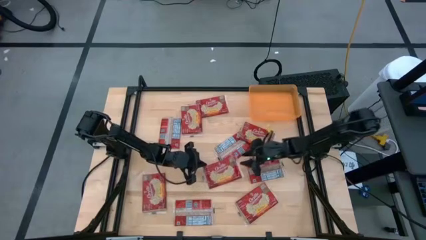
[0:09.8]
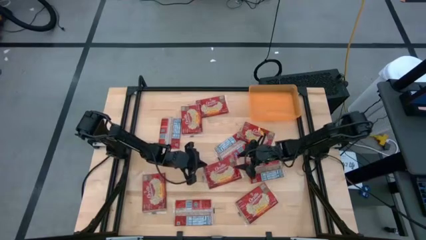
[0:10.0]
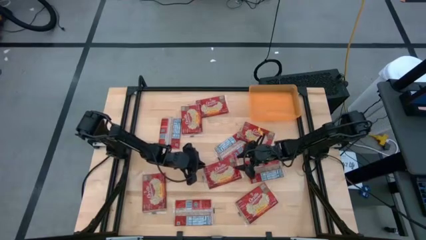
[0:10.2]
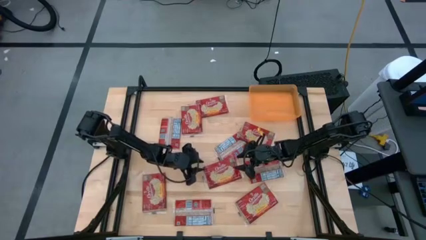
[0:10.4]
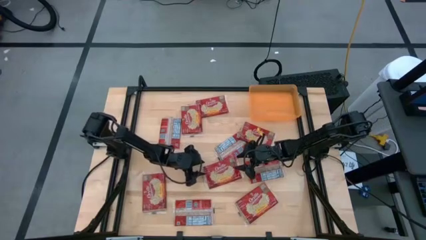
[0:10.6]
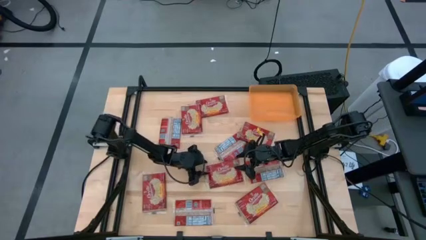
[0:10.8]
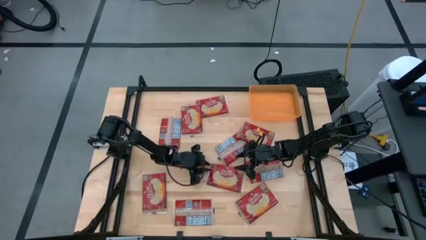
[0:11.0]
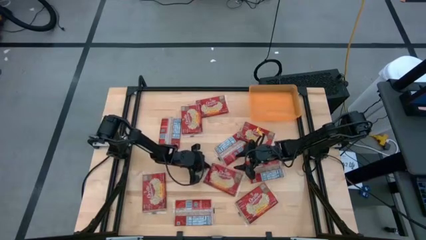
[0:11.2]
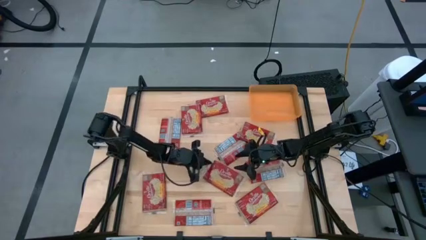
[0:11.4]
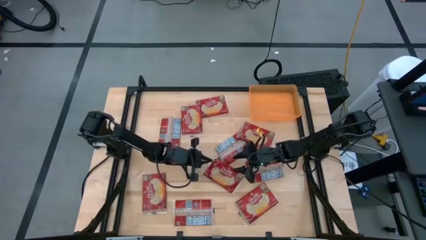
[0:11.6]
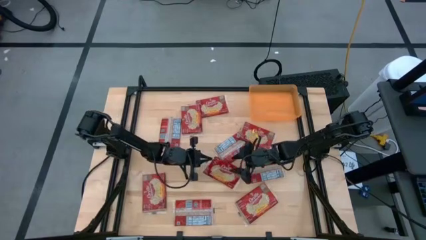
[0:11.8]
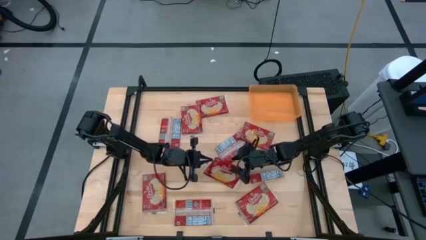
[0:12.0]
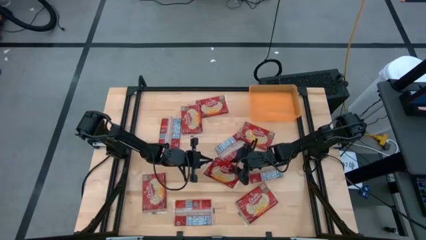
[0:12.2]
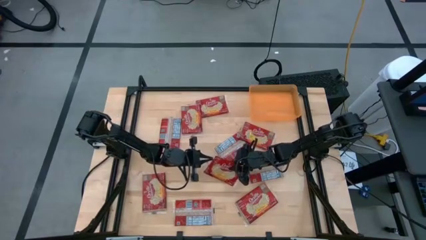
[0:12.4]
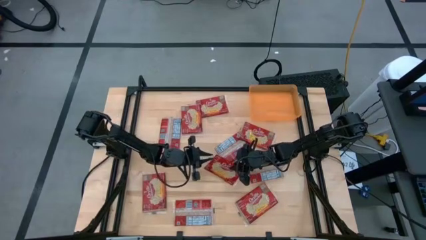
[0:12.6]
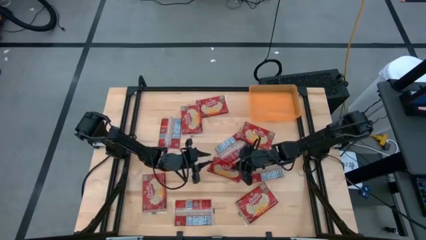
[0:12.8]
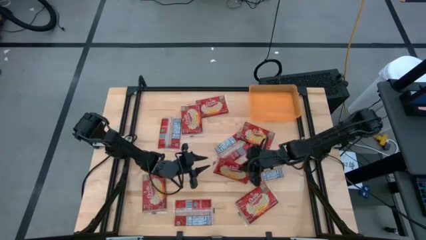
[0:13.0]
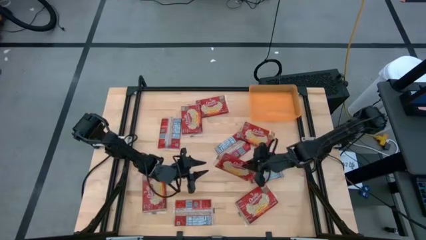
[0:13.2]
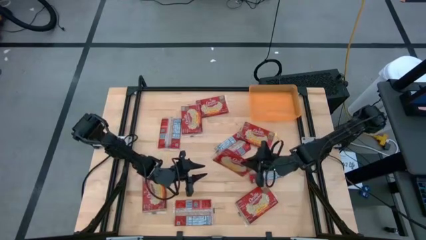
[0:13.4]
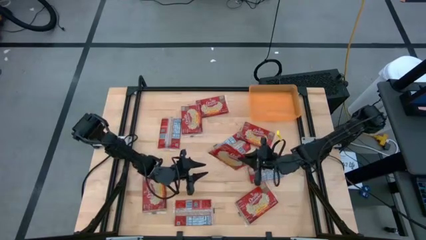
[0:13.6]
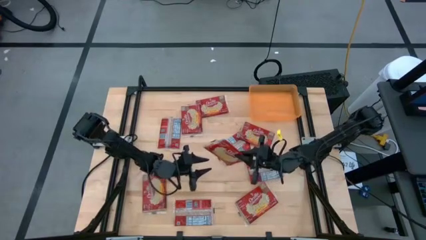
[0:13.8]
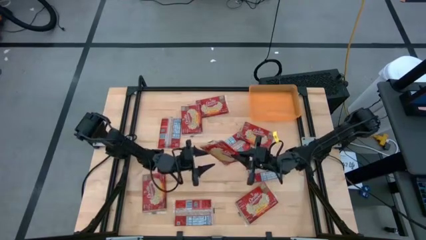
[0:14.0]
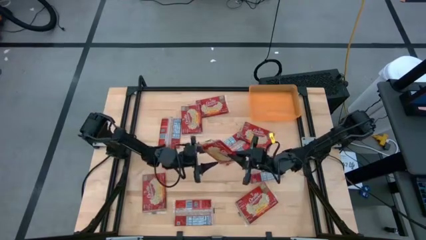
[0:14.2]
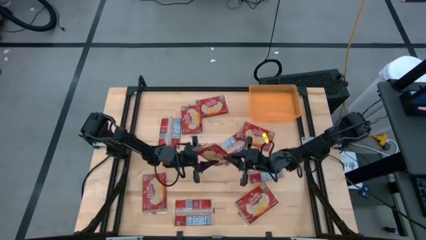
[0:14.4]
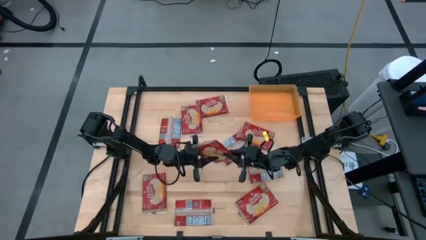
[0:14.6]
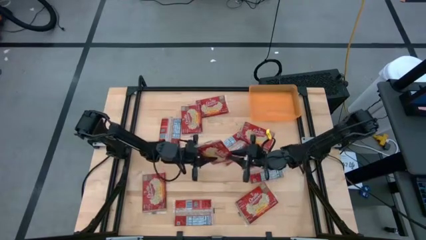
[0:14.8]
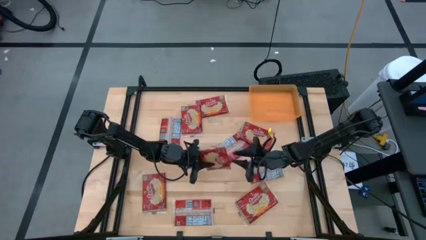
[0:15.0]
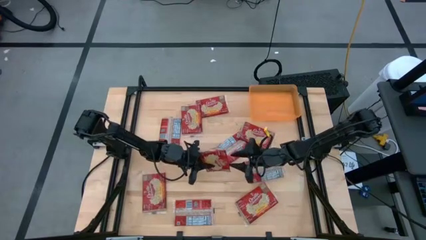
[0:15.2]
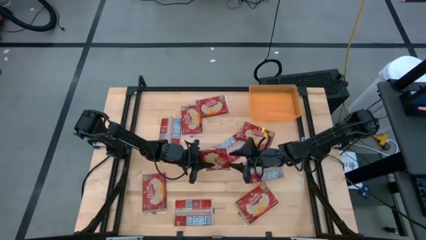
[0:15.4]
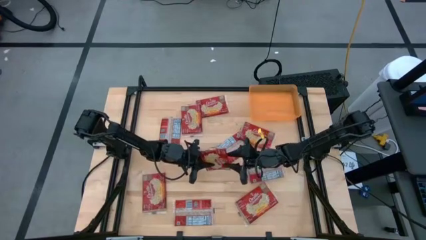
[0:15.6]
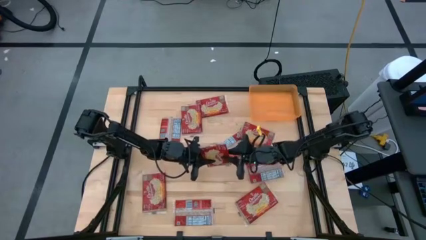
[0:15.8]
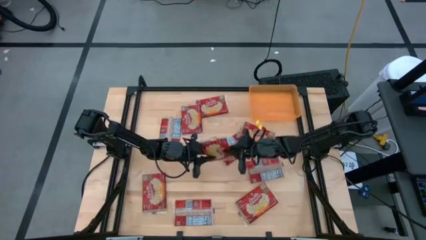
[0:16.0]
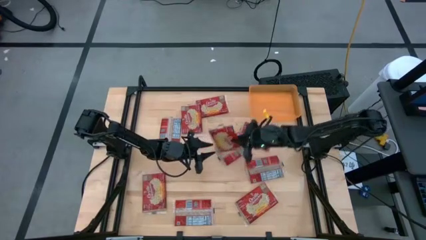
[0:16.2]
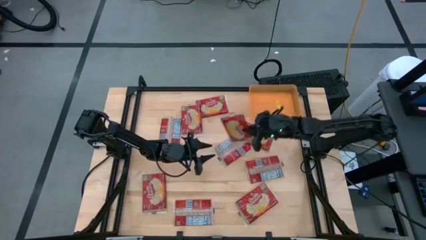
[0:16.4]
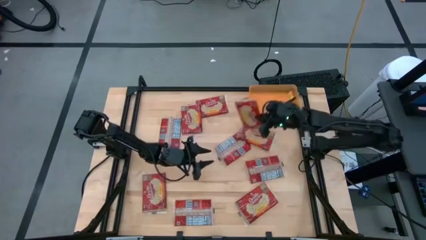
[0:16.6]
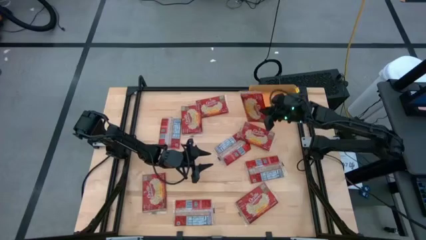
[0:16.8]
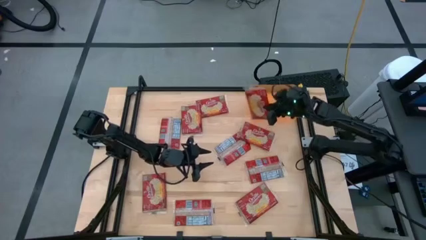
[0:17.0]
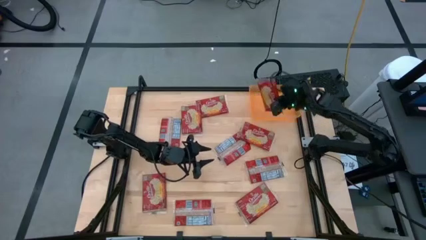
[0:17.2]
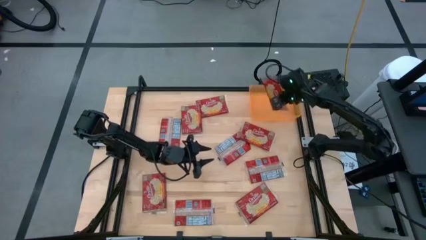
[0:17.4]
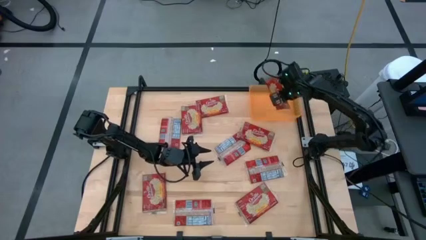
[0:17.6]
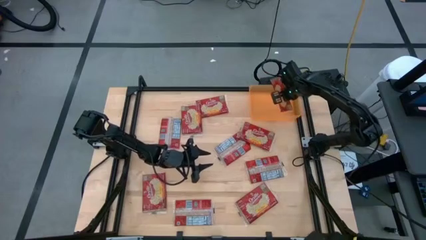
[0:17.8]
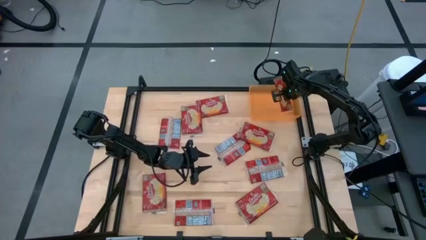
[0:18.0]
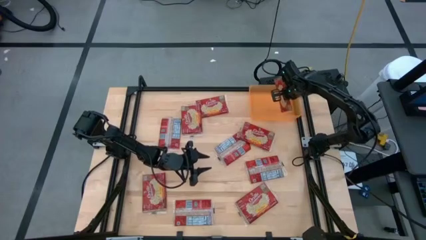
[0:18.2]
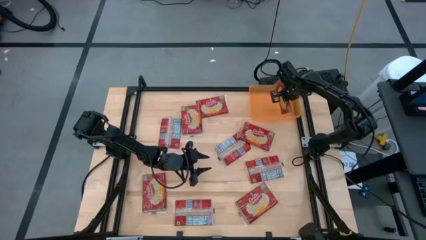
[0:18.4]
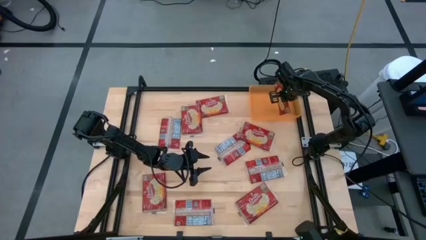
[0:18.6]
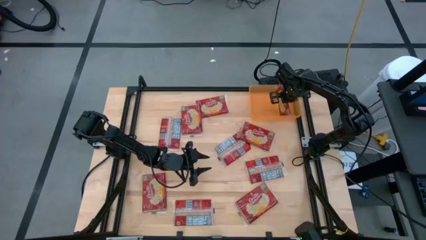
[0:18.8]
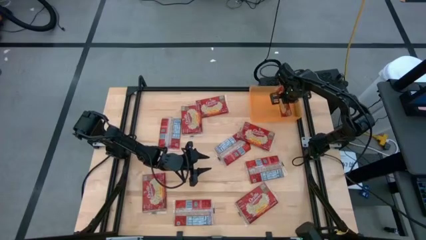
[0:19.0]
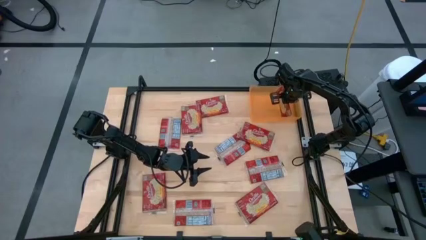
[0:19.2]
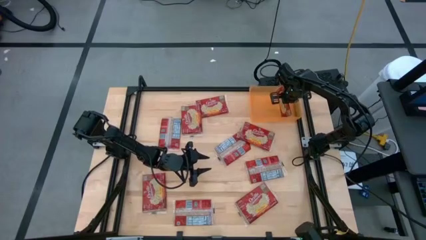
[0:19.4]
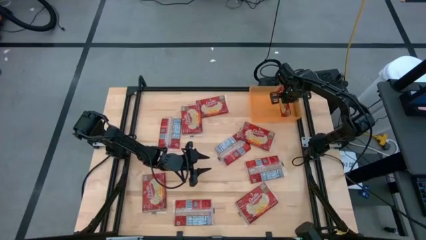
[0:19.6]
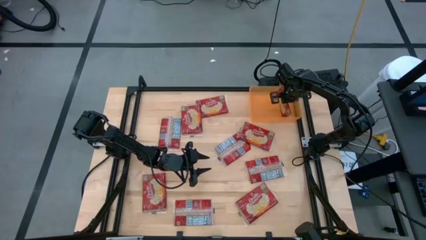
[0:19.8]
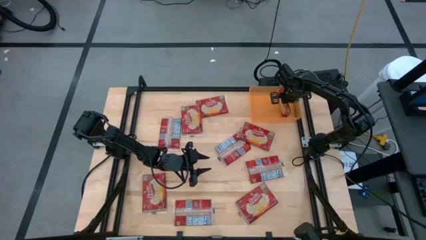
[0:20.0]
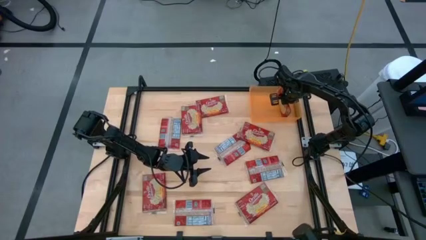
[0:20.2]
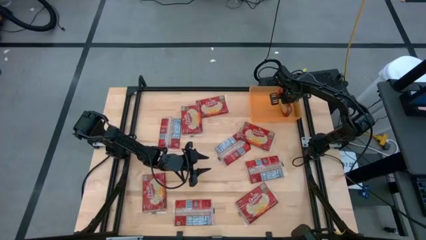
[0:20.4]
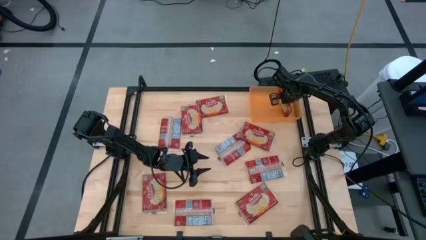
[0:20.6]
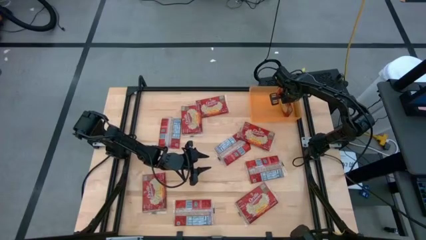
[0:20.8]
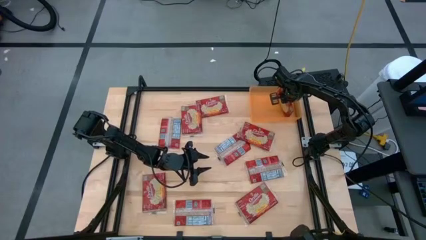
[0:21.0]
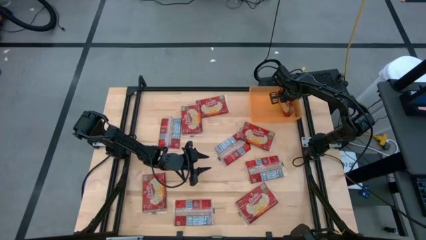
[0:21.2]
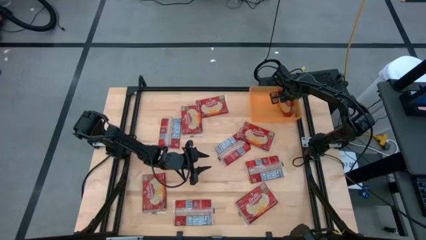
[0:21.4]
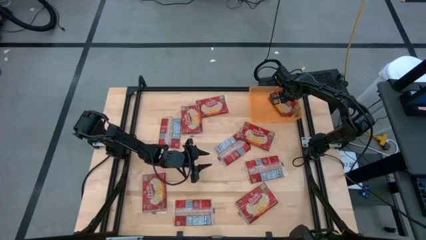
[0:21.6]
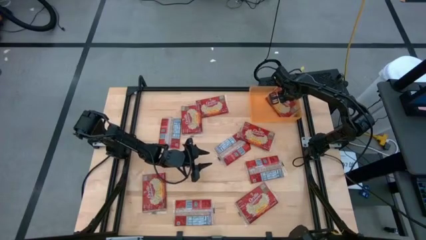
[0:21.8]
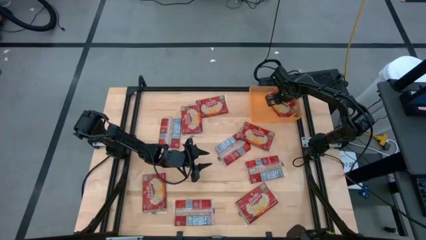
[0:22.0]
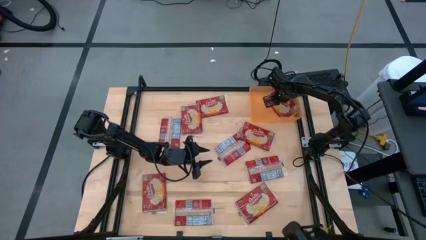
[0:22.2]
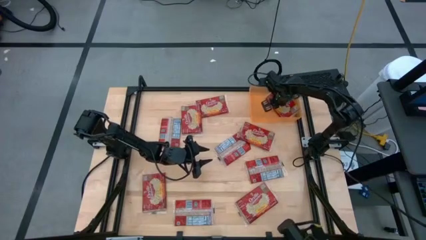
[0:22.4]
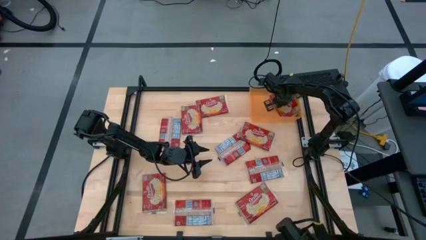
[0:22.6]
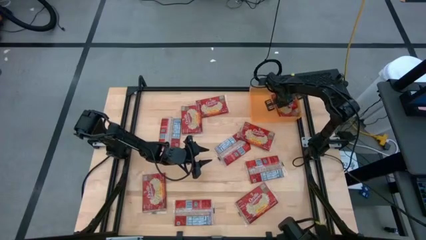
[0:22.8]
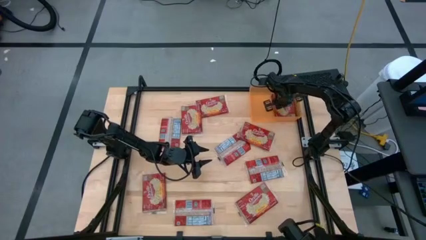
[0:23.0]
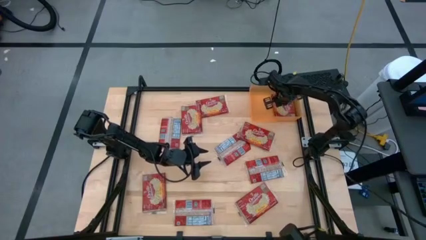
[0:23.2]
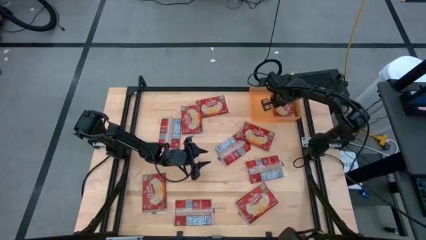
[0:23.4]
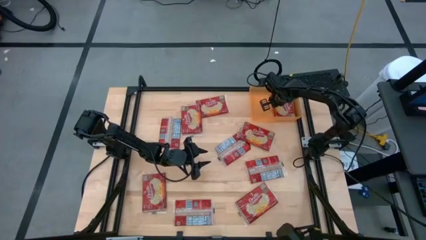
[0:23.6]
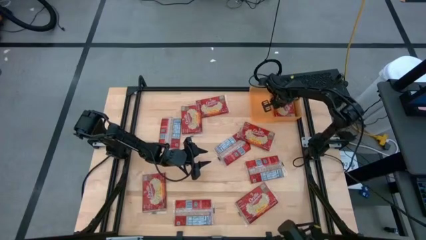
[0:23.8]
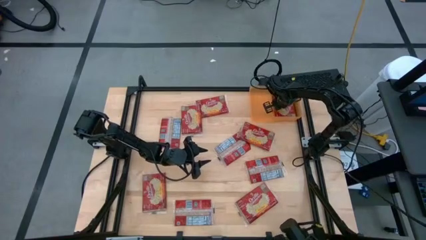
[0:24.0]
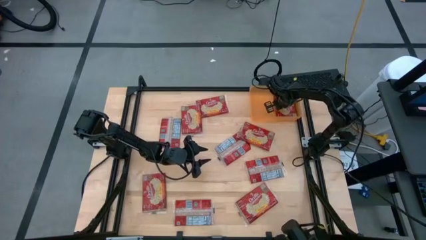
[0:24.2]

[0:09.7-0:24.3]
Task: Sort popcorn bags into baskets
Put the red popcorn bag into the orange bin
